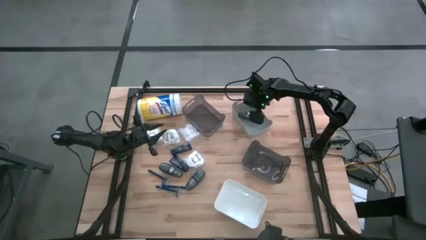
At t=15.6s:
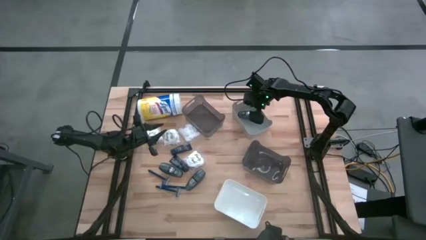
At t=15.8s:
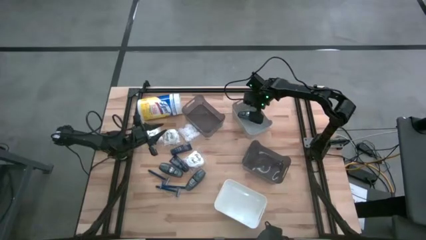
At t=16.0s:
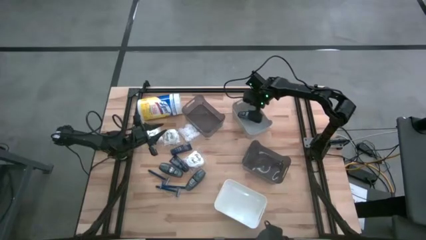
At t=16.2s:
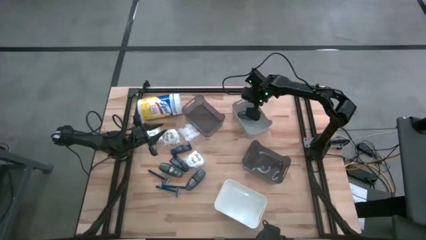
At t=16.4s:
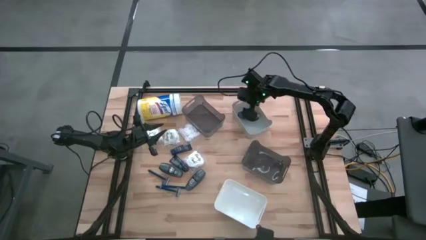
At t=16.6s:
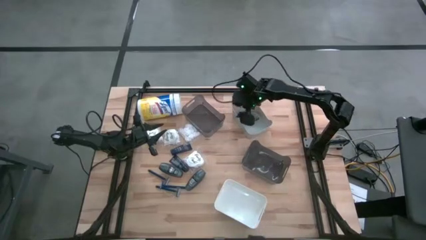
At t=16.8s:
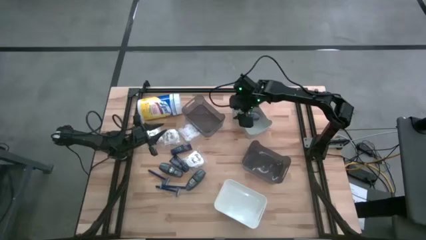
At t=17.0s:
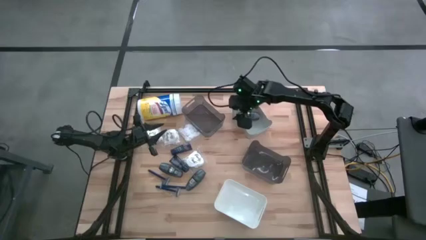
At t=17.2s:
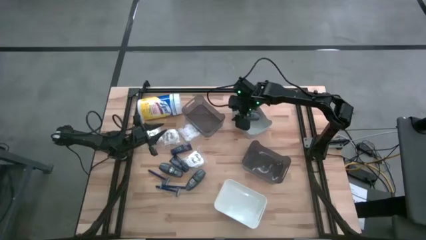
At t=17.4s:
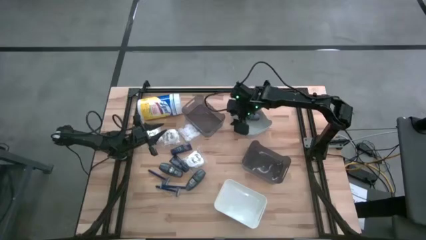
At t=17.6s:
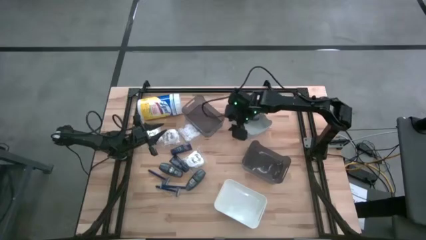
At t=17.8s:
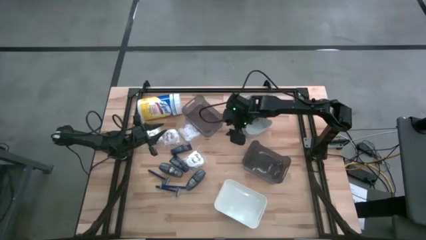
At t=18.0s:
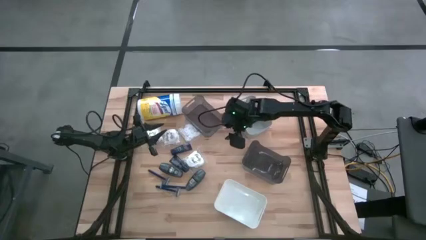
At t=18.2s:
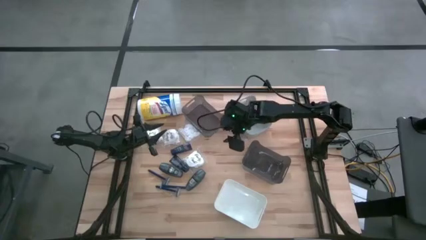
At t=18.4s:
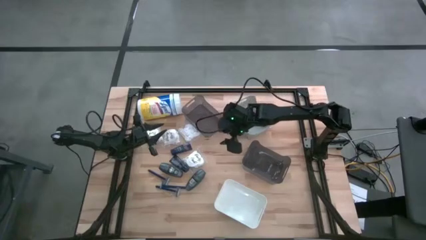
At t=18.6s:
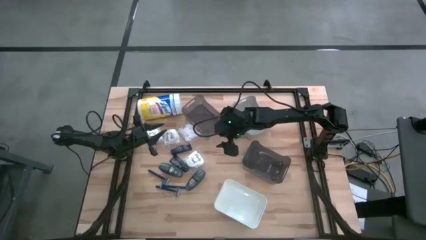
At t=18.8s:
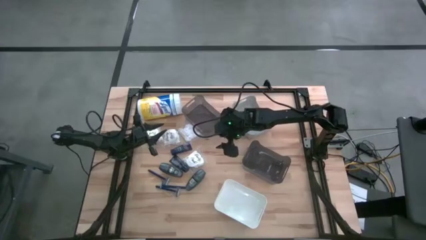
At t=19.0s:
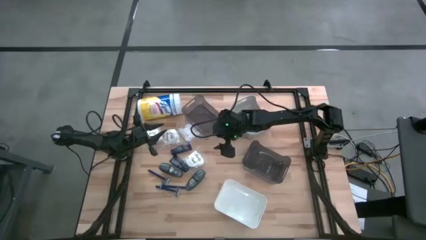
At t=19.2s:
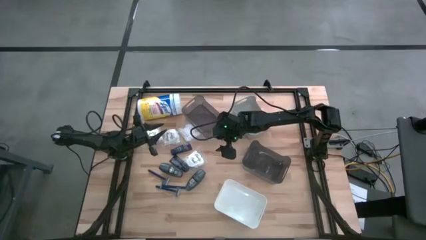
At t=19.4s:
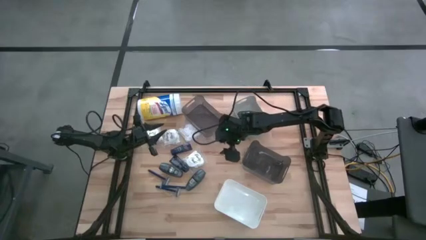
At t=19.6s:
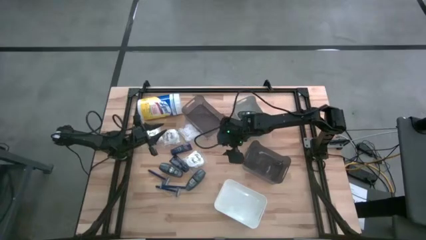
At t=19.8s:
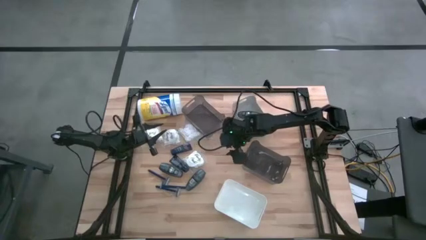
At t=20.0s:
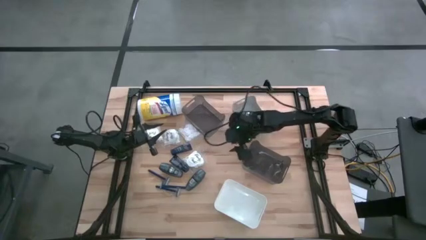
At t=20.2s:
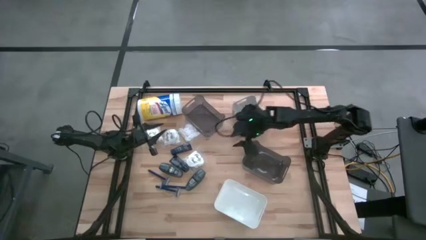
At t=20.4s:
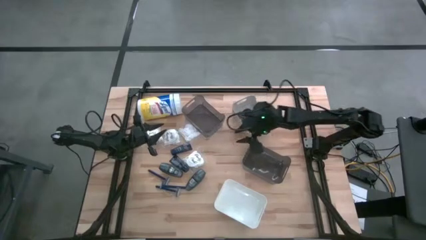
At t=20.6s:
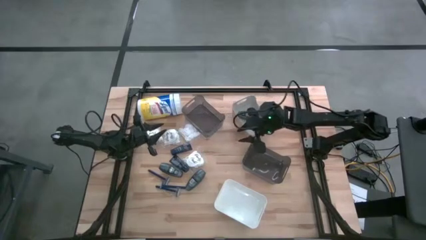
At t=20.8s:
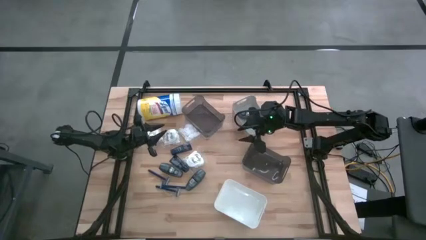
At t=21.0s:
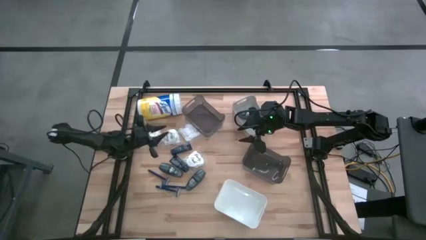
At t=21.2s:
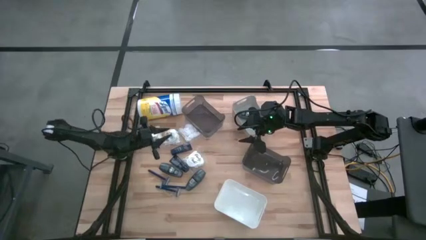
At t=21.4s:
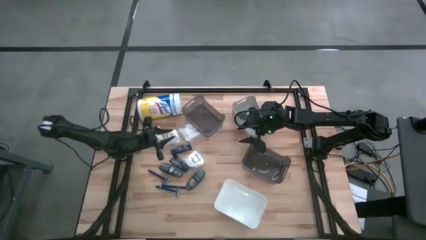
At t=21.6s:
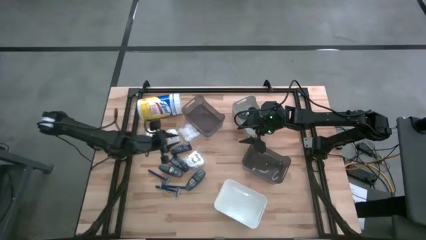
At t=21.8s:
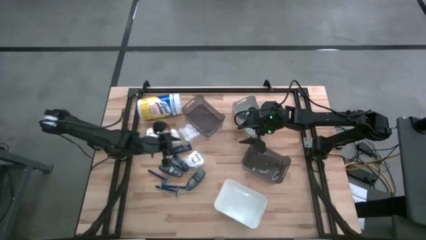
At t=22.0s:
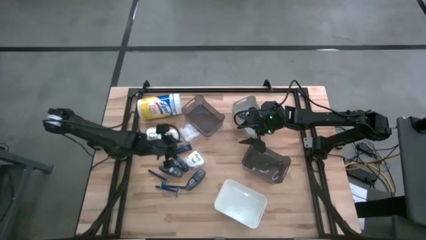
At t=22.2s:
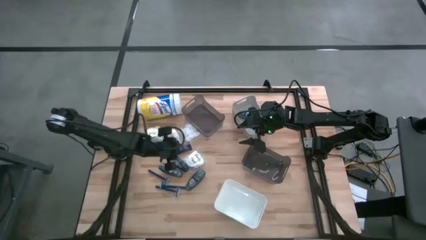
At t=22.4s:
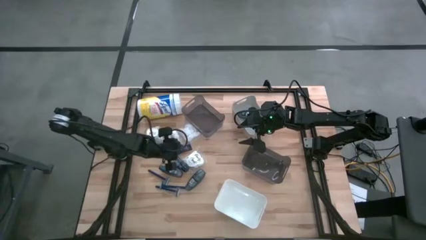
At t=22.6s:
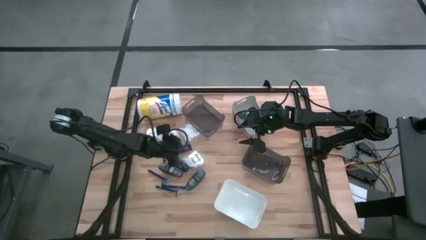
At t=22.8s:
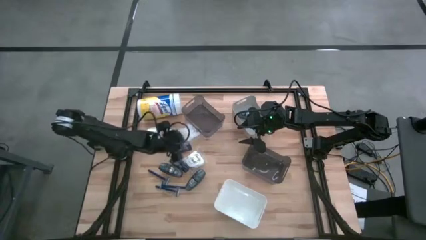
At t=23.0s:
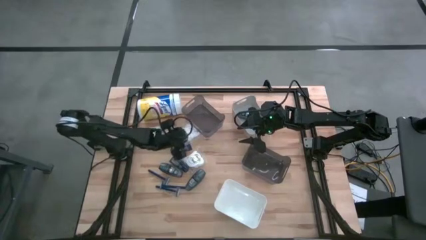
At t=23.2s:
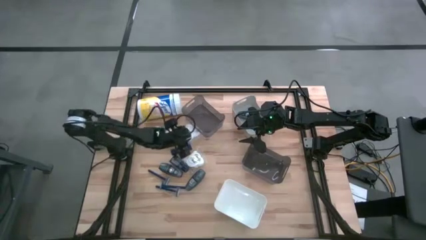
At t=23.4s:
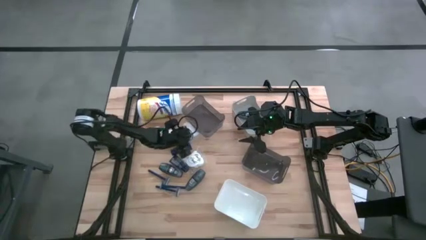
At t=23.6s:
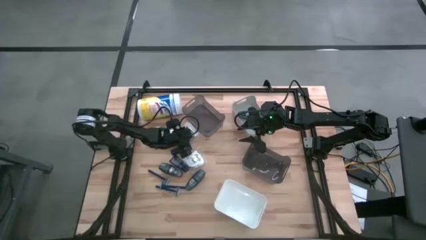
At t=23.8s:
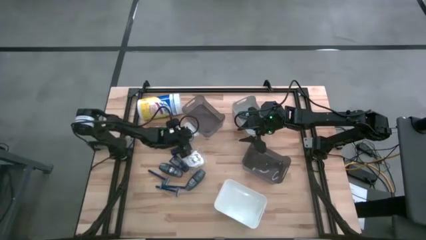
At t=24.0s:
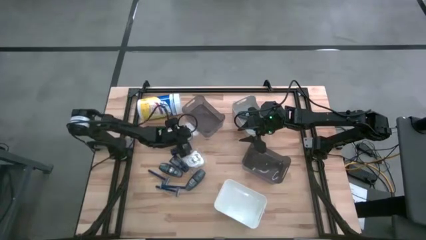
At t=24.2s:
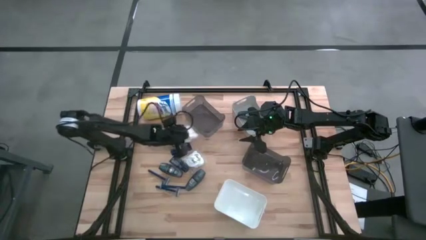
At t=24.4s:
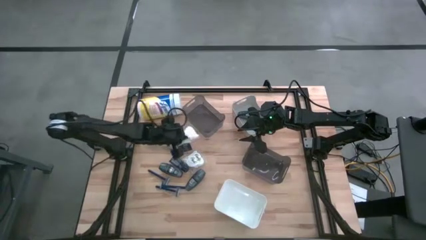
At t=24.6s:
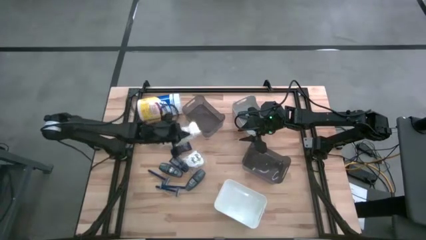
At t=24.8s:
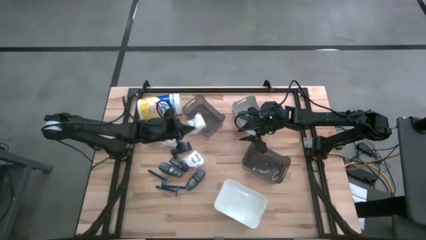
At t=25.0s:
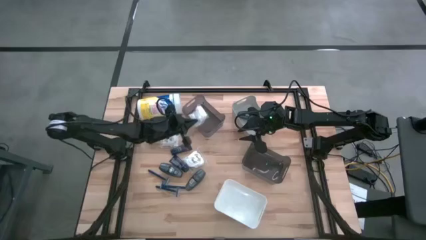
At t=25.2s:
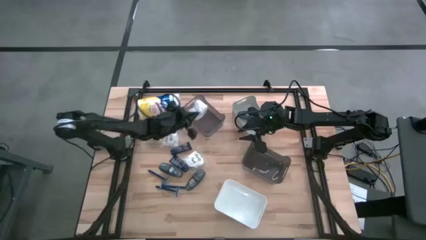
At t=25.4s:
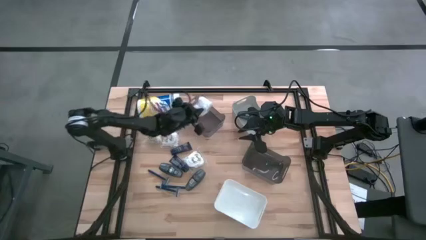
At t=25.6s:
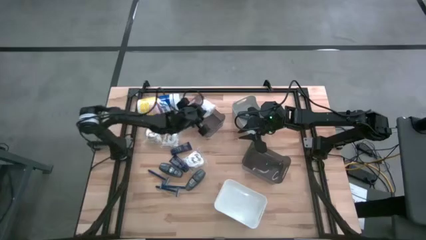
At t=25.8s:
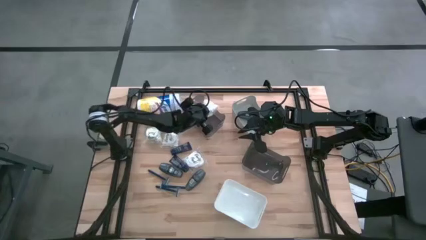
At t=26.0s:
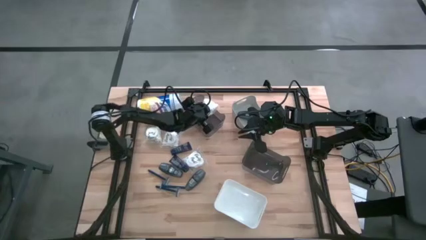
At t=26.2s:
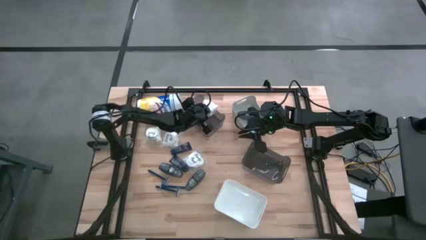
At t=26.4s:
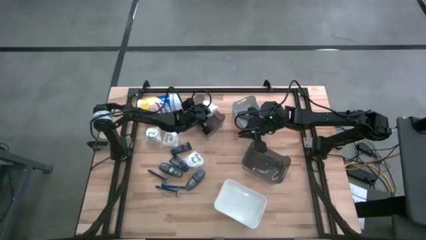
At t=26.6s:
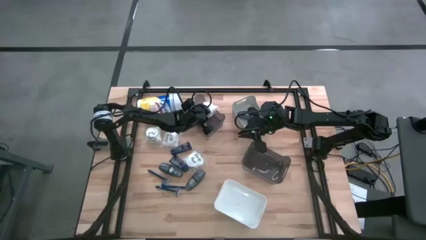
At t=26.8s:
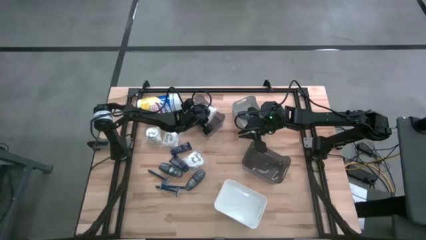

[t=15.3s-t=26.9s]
Task: Pick & Place Travel size toiletries
Put the white cotton pack into the top black bin

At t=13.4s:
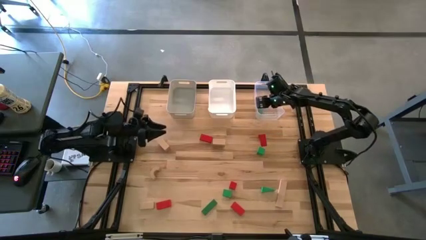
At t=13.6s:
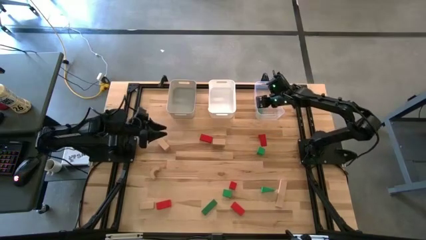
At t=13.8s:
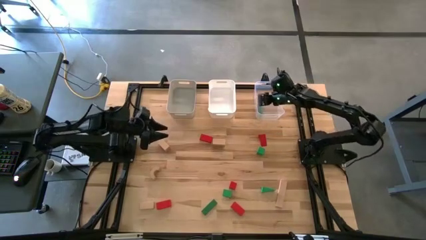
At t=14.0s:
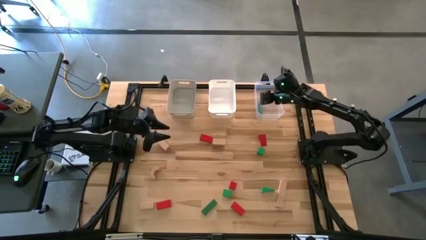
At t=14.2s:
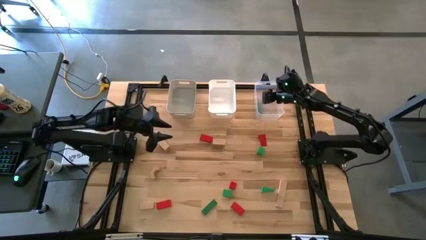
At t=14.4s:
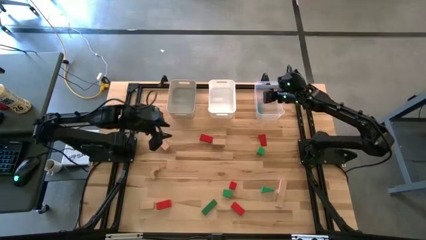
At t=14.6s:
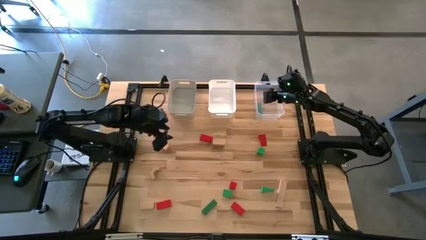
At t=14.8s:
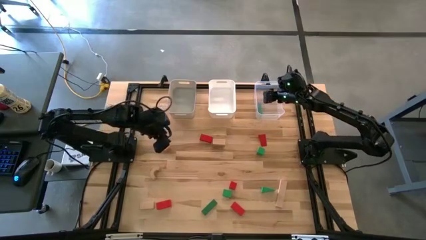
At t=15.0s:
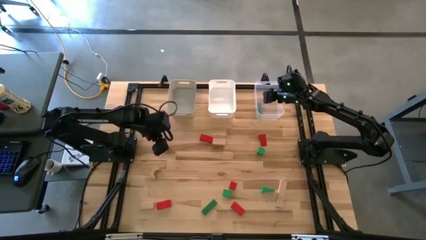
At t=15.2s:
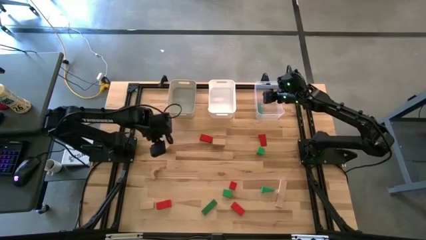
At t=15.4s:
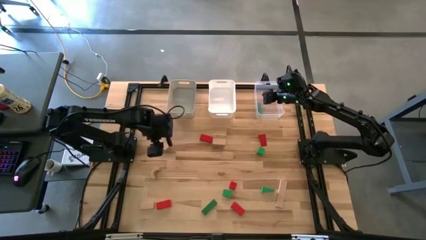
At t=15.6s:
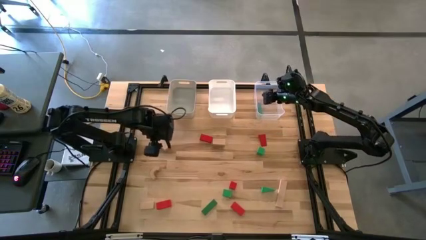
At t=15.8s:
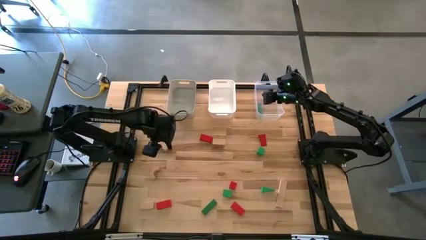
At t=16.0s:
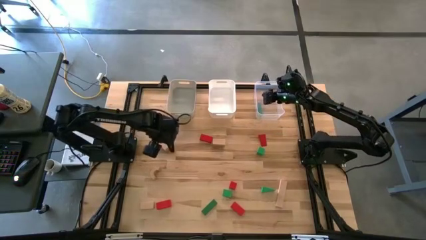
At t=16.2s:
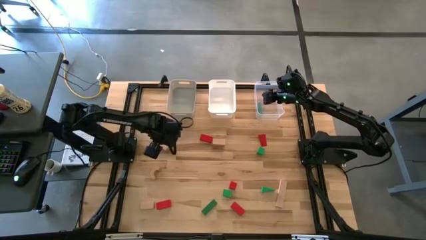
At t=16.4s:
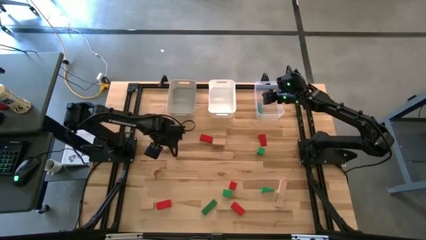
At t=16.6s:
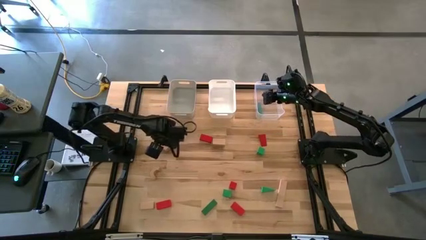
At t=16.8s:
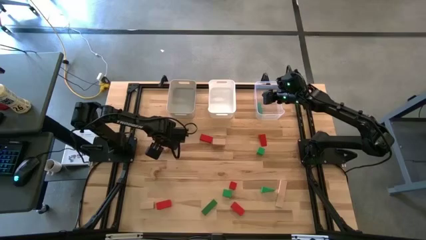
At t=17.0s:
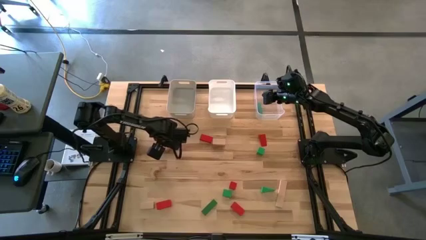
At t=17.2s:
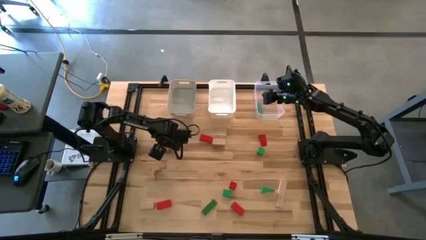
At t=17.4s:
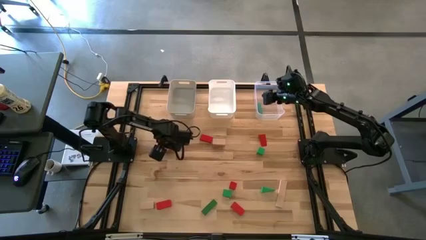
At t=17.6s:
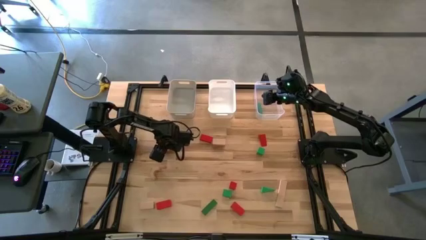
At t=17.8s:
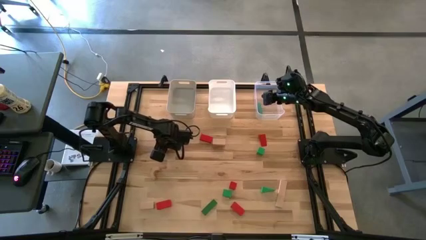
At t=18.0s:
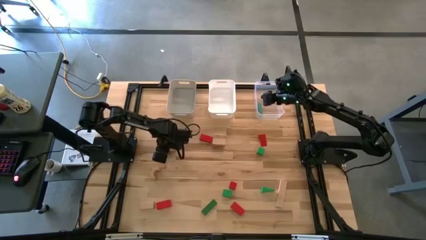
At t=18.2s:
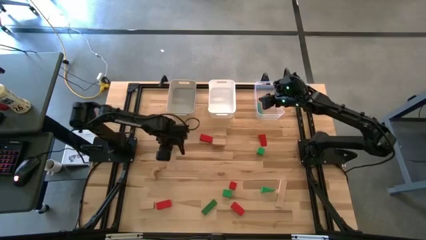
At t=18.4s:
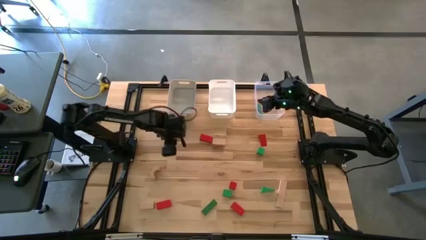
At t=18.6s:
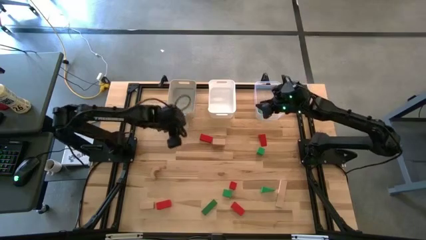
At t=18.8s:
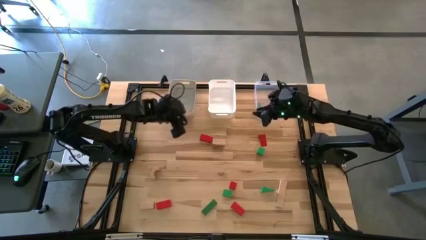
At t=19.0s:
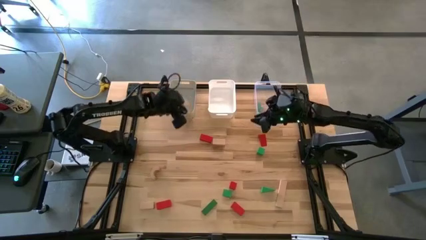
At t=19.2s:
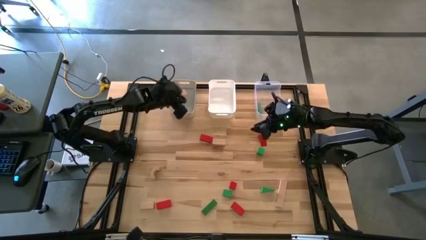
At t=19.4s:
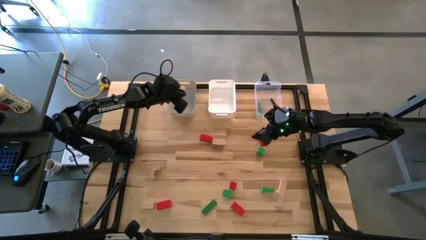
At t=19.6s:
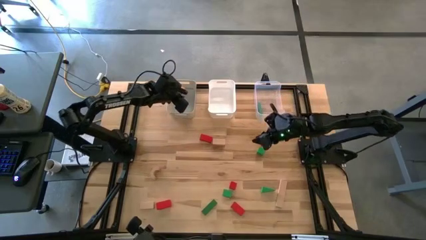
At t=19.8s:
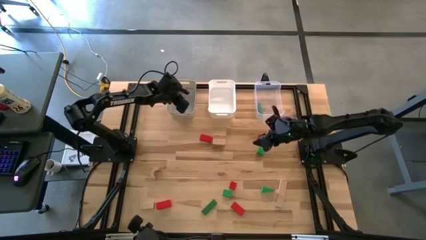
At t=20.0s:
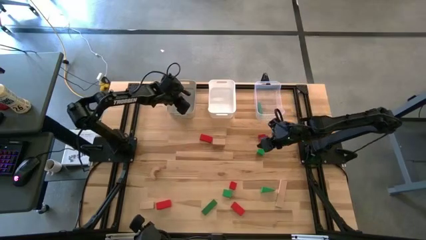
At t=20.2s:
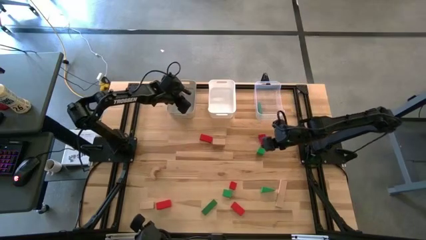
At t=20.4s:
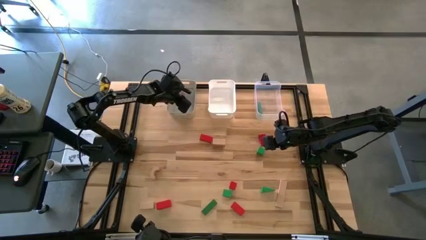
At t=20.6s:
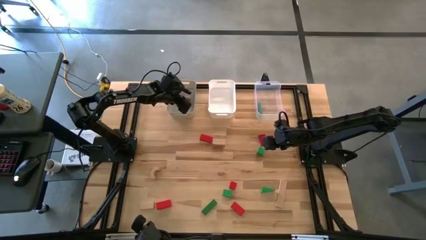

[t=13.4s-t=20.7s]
Task: Sort & place blocks by color
Put the brown block into the gray bin
